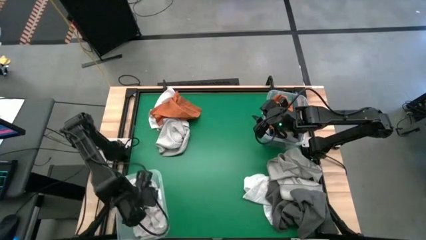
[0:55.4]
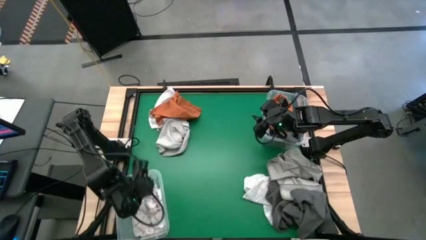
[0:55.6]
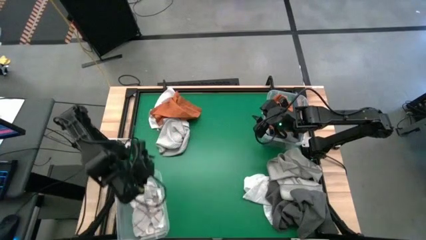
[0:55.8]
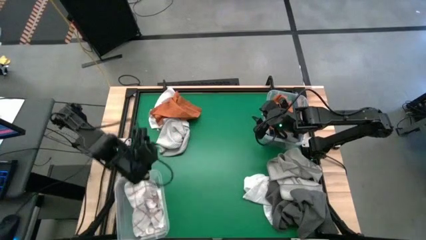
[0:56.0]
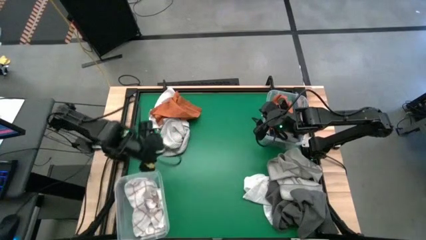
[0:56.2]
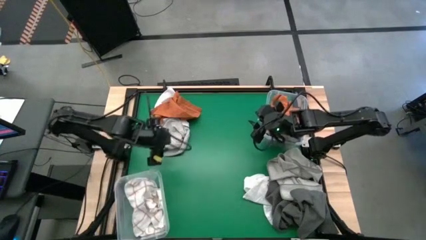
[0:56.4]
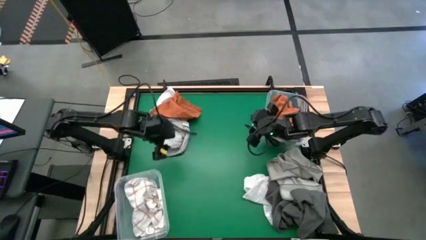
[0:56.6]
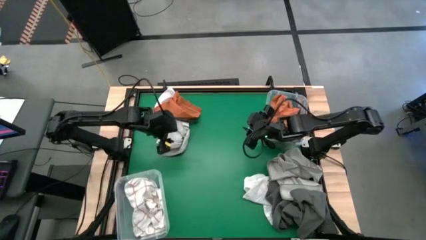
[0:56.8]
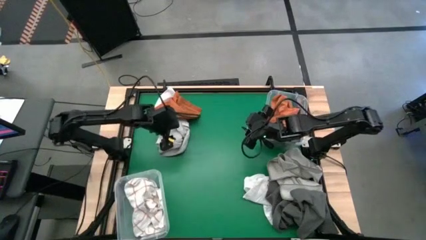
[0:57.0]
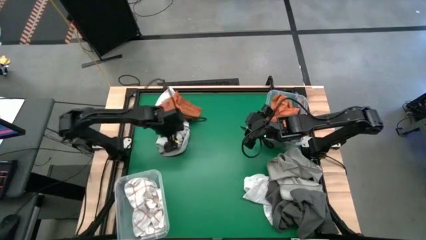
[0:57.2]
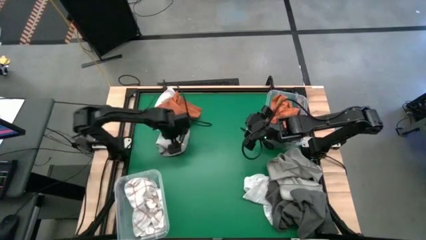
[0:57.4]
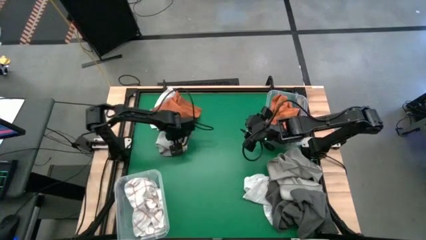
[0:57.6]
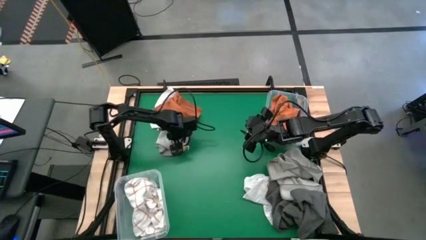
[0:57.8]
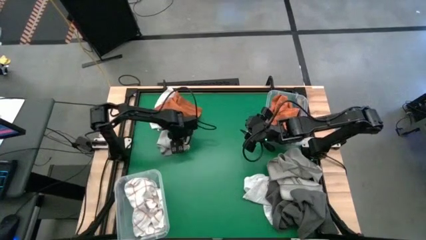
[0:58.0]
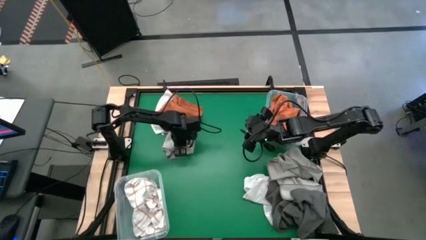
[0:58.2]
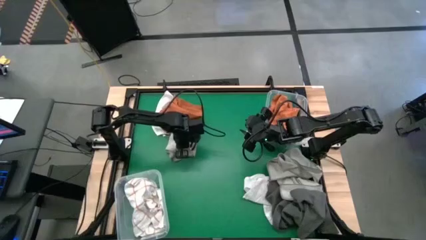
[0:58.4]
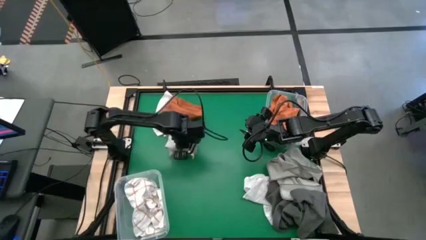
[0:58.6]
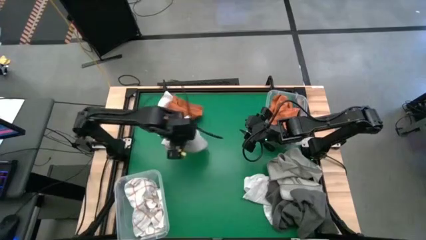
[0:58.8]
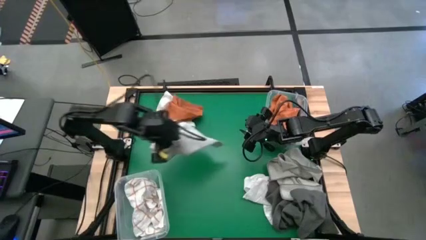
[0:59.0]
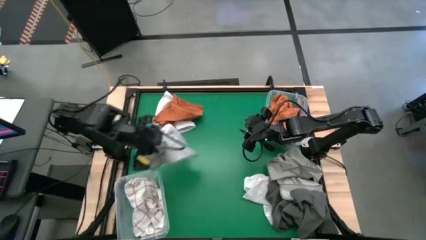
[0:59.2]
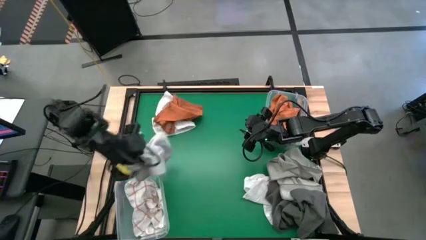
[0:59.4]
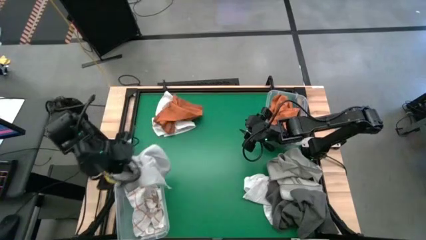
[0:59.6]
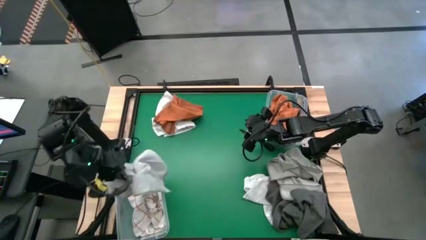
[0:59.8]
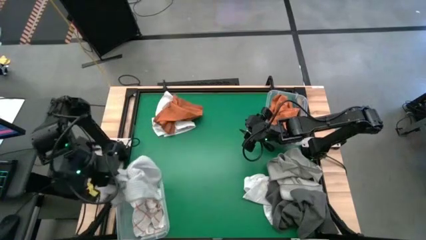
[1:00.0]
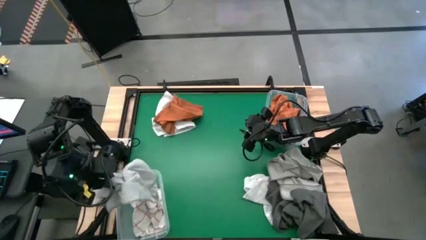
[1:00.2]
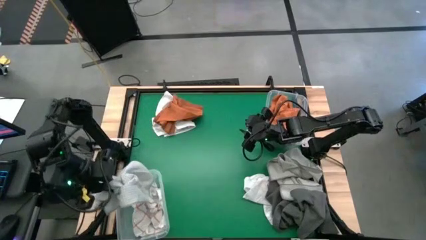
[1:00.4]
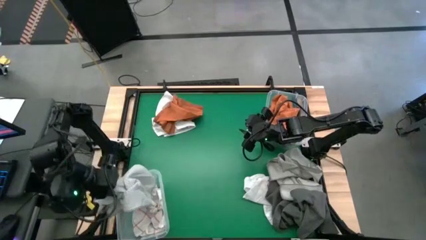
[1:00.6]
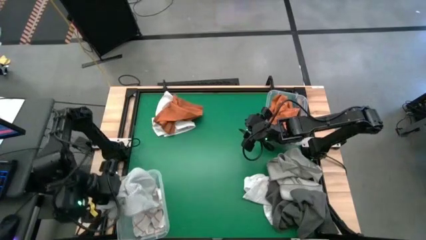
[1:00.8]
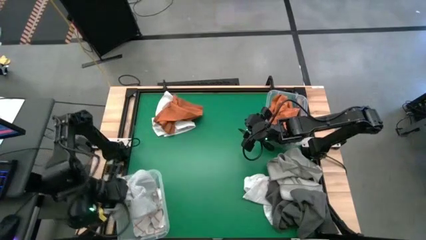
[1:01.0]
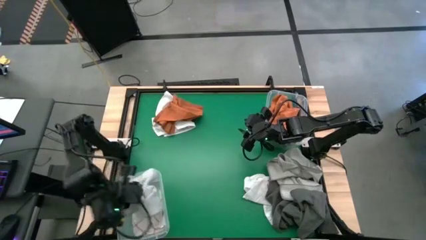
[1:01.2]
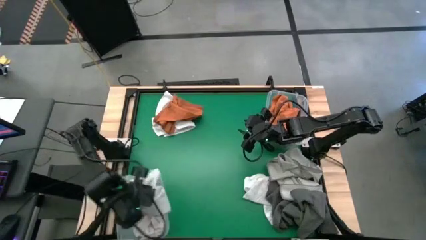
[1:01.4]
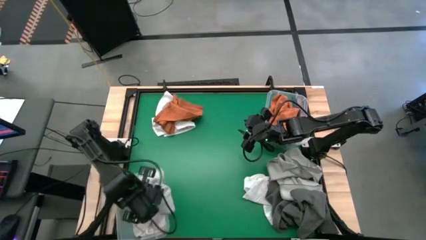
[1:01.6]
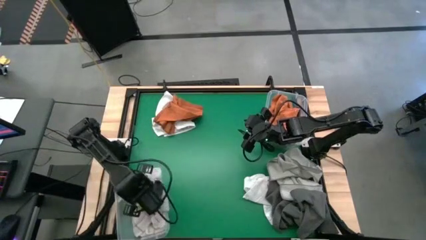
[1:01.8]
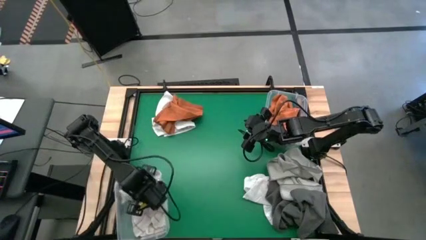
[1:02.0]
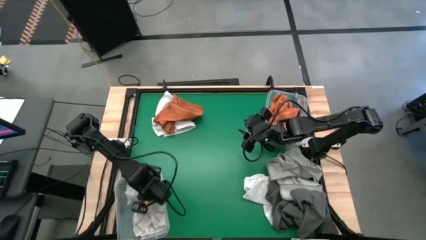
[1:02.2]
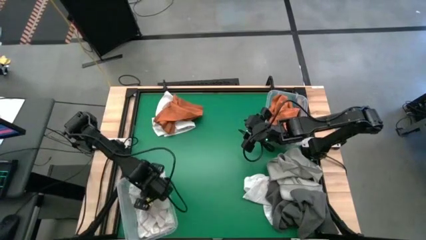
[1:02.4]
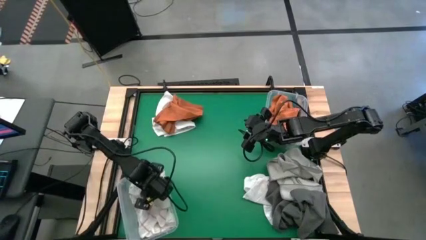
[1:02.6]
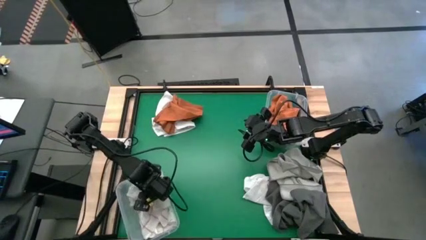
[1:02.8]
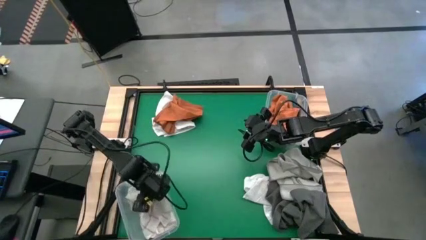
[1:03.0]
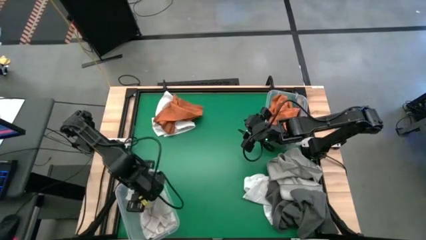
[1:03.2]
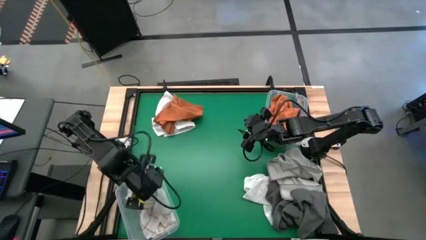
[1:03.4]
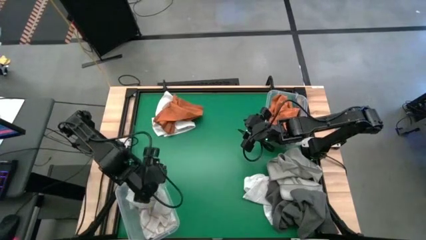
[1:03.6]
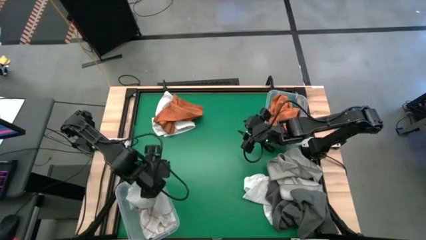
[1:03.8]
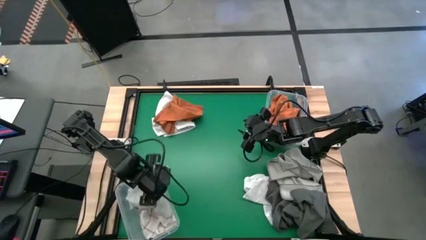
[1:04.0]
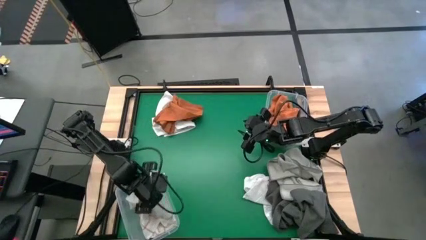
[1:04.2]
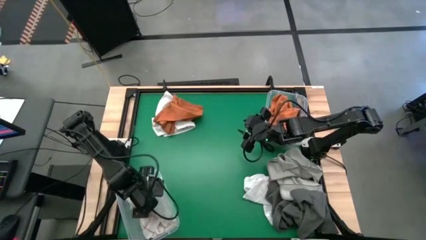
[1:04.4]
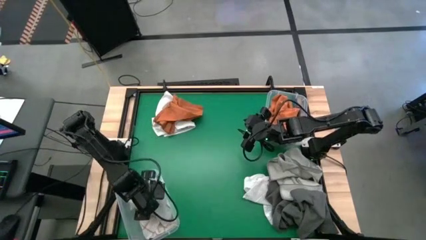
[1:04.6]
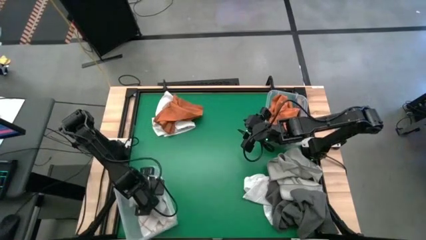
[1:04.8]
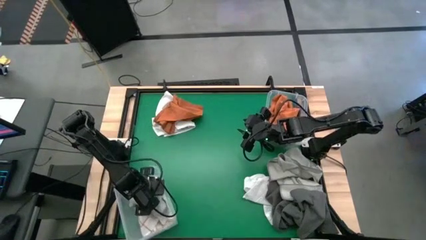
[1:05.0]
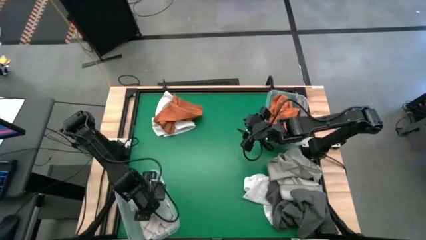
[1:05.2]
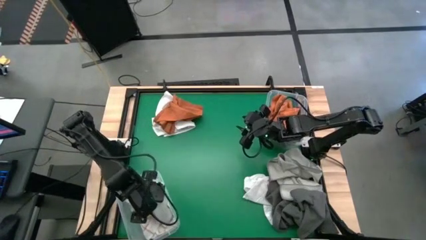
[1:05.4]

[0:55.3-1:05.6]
Task: Sort towels by color in basket
Put the dark gray microfiber towel into the bottom transparent bin
